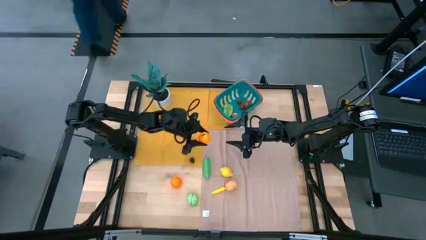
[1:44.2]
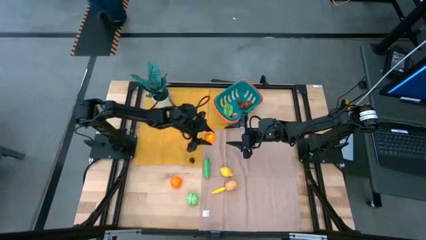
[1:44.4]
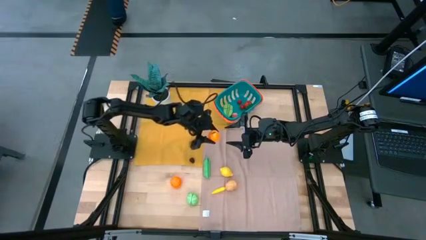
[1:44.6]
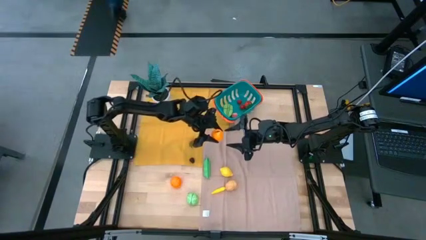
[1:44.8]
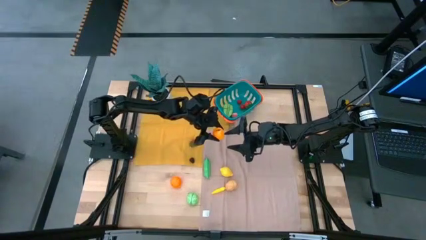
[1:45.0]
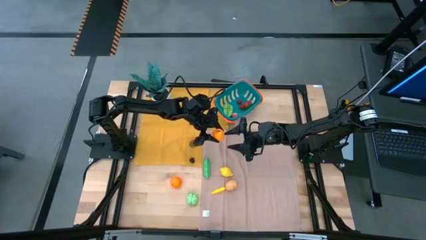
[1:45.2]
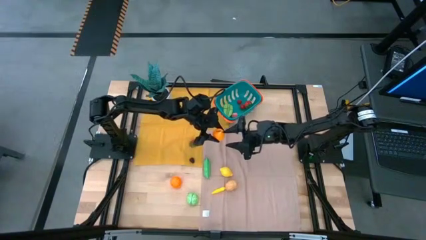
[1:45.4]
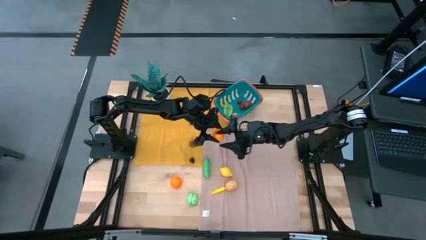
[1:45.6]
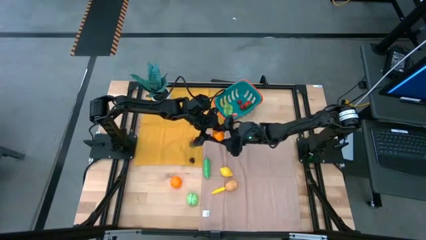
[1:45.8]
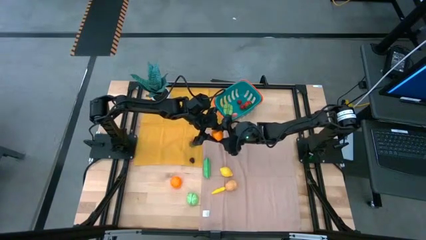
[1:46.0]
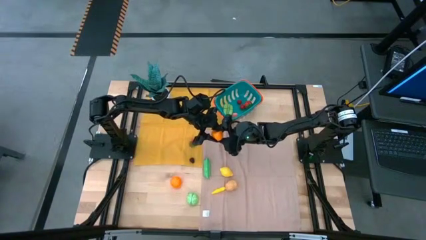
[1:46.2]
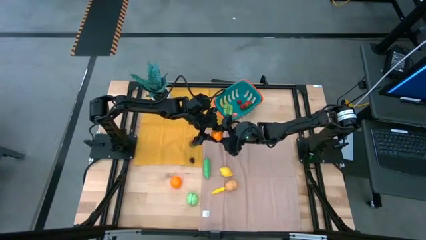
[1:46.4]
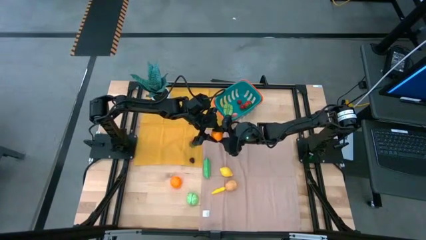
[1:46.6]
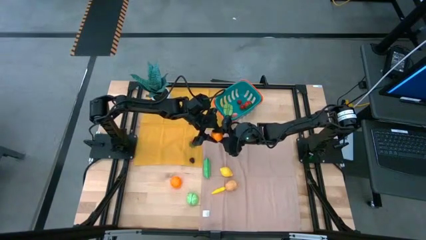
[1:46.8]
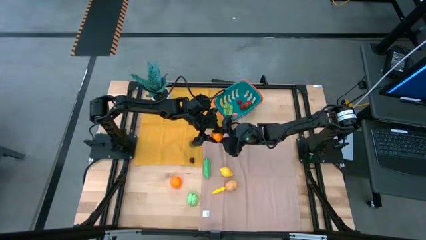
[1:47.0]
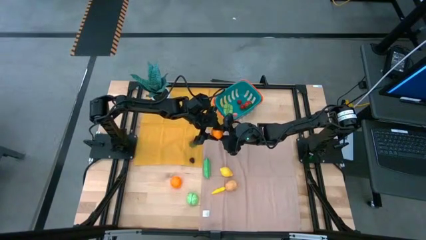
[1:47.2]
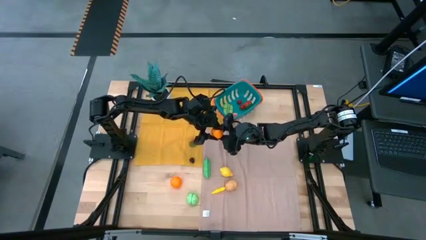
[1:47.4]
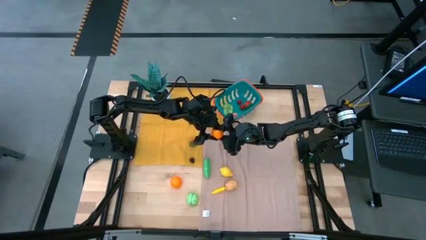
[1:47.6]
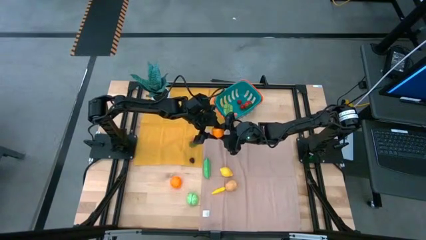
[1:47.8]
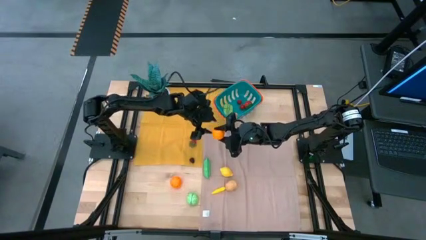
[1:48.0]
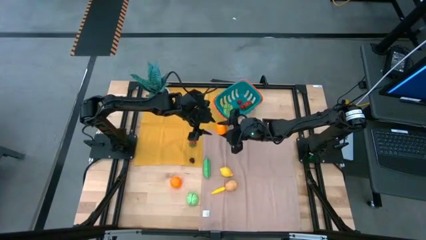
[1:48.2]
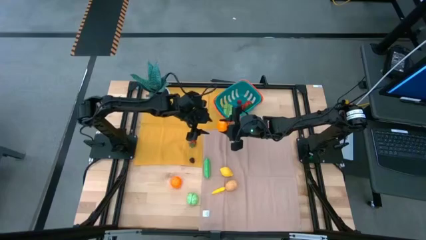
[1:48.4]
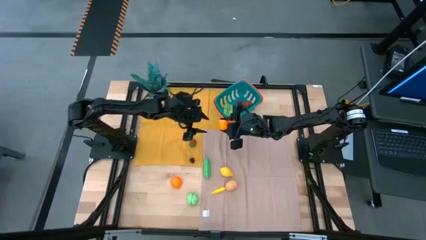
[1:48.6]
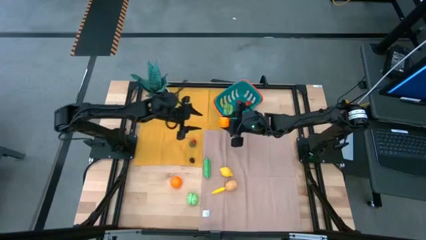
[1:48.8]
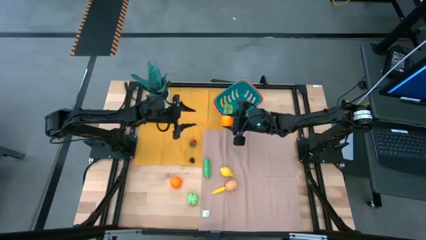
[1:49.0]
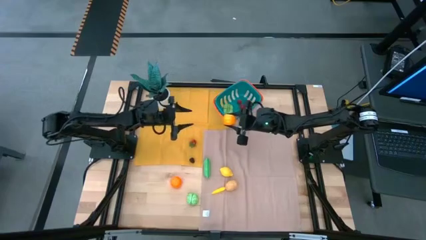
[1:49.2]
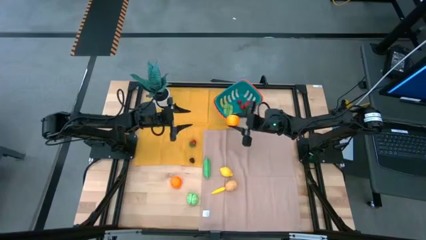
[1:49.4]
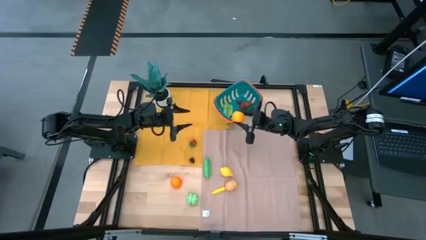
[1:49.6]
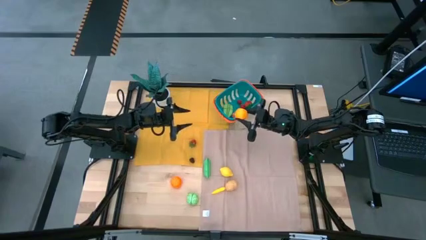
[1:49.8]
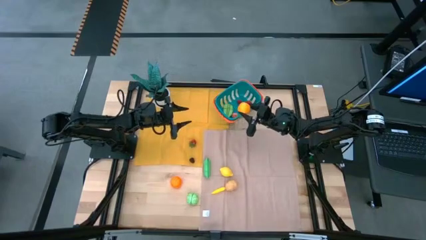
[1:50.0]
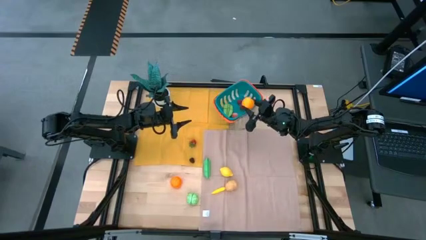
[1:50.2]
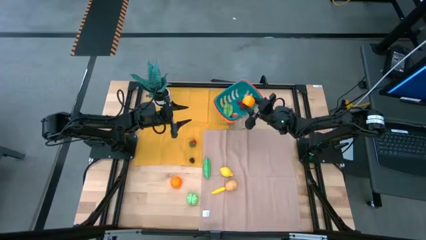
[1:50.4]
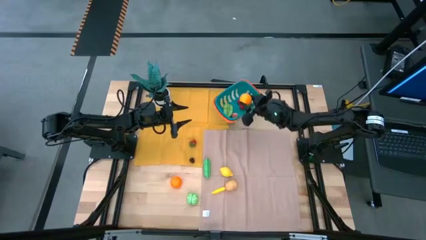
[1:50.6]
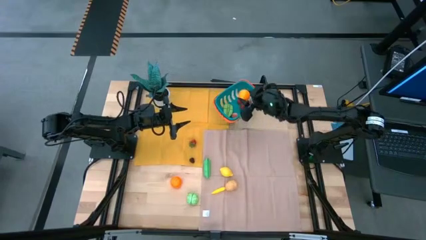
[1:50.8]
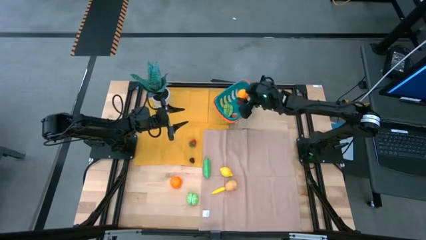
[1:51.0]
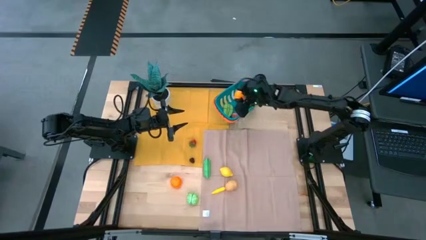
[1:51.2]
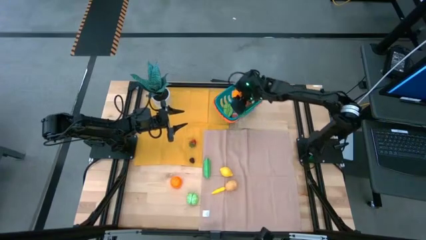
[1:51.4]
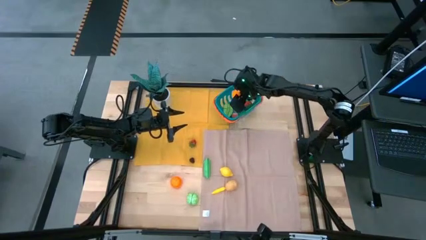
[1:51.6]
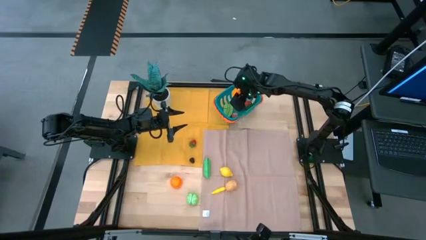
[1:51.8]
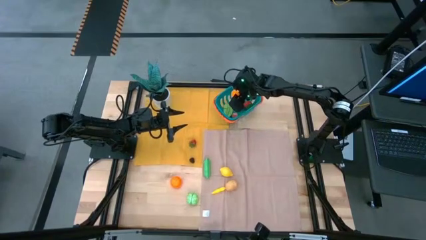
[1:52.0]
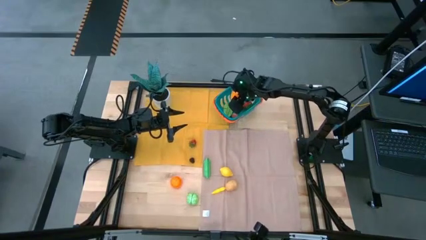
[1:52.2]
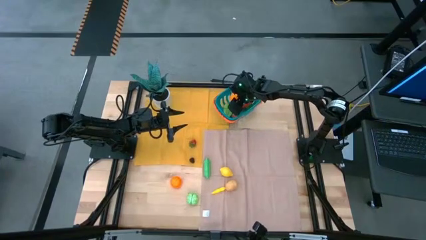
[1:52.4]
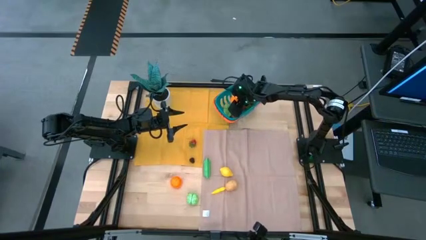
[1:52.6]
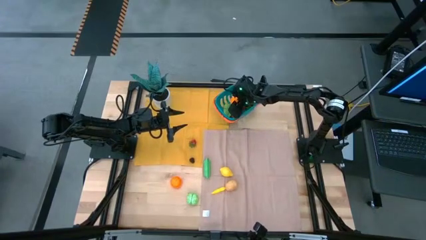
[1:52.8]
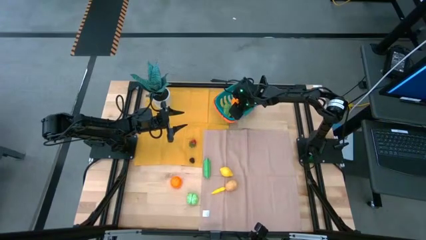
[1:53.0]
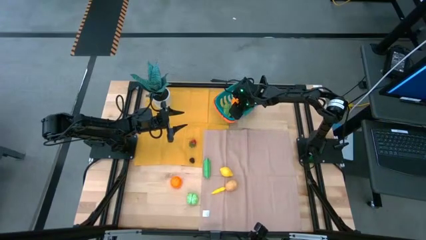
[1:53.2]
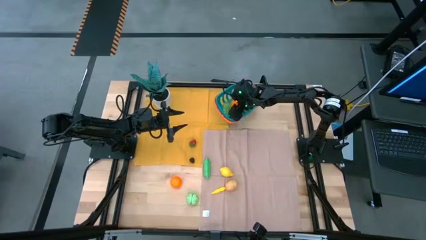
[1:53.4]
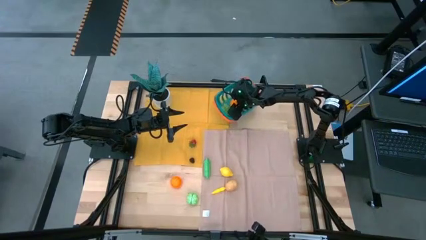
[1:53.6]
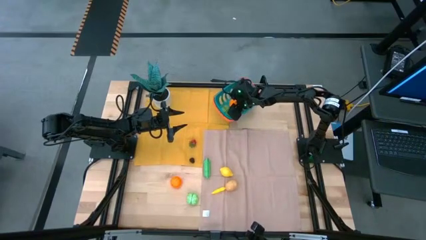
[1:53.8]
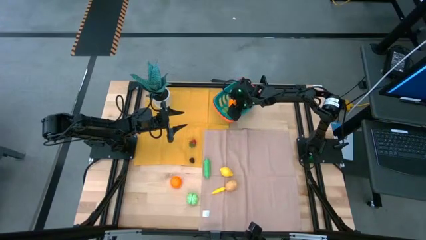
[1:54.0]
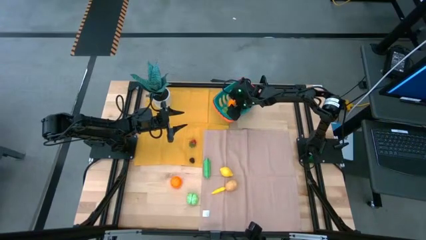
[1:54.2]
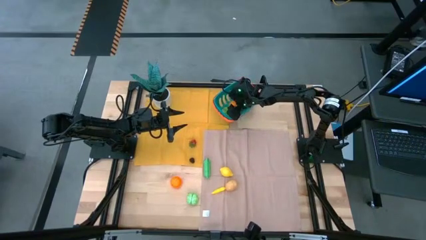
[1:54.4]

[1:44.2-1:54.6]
Task: Pick and placing Produce into tupperware
Put the orange into the basket

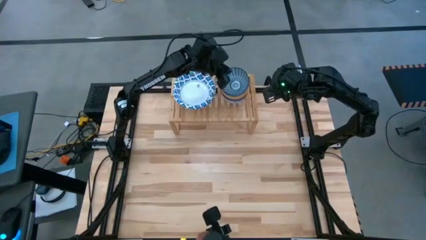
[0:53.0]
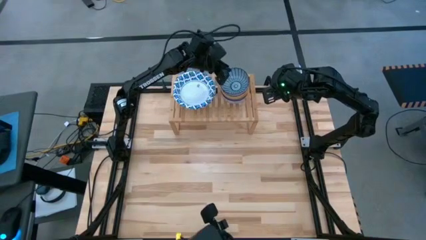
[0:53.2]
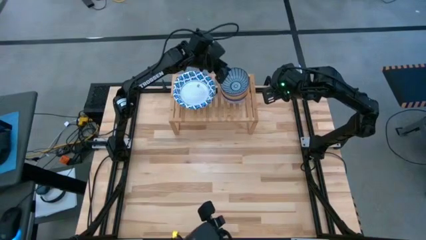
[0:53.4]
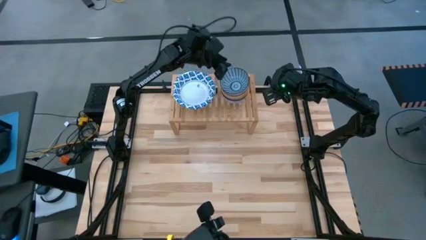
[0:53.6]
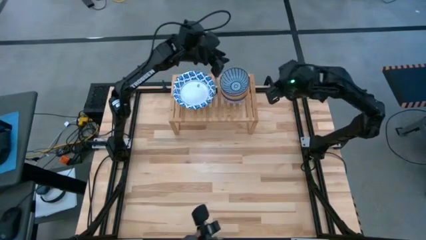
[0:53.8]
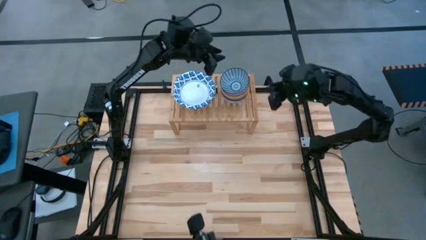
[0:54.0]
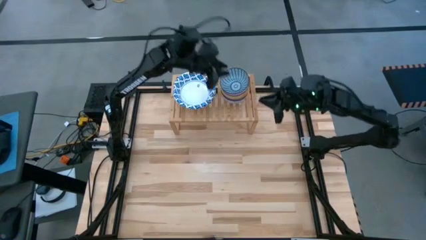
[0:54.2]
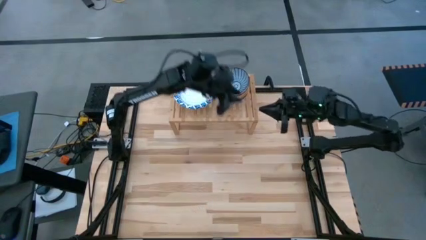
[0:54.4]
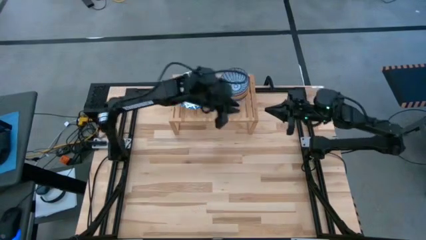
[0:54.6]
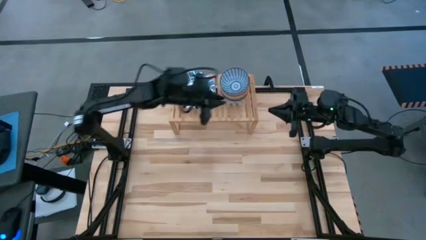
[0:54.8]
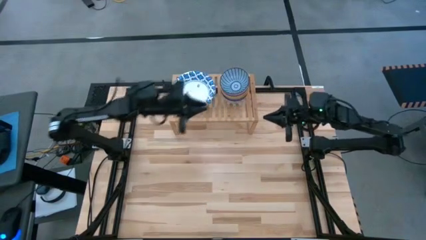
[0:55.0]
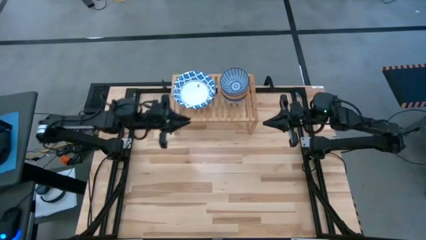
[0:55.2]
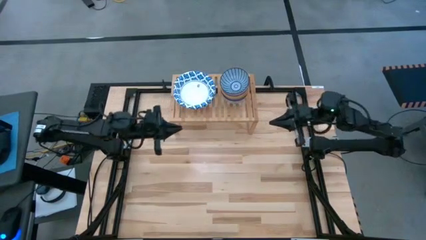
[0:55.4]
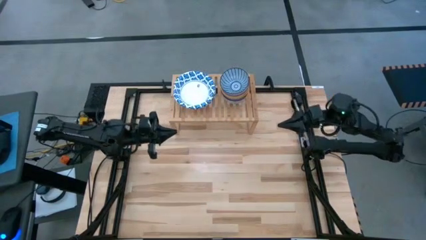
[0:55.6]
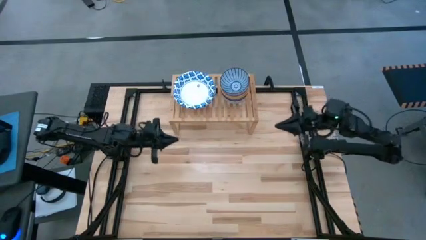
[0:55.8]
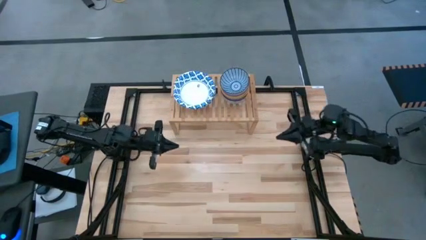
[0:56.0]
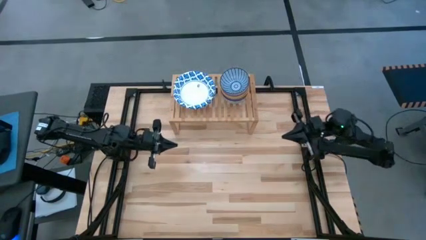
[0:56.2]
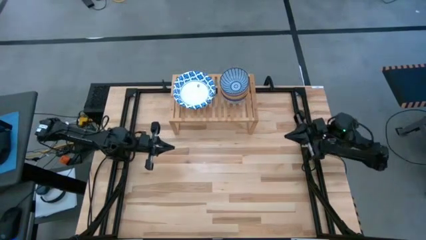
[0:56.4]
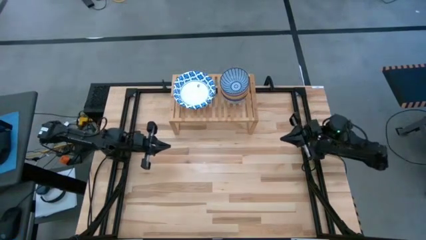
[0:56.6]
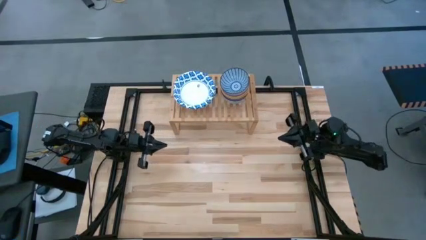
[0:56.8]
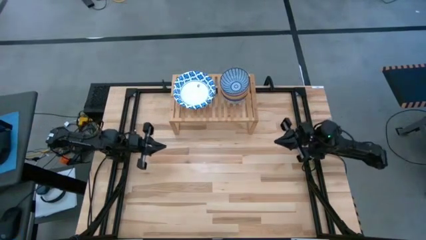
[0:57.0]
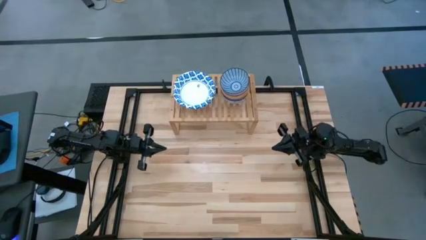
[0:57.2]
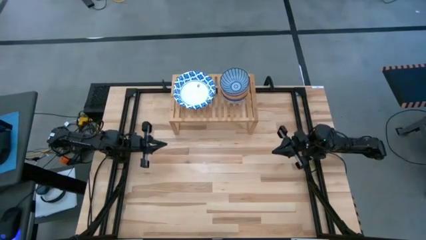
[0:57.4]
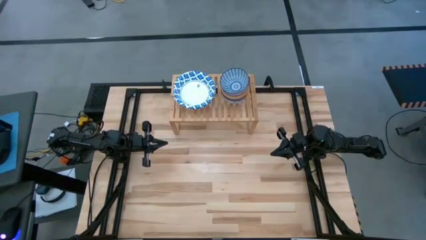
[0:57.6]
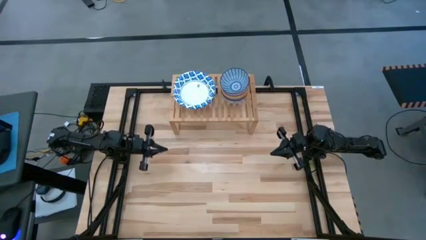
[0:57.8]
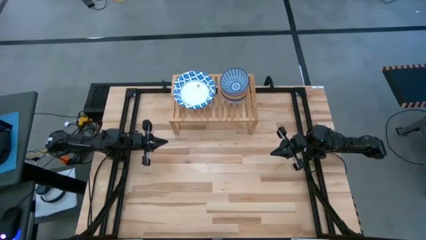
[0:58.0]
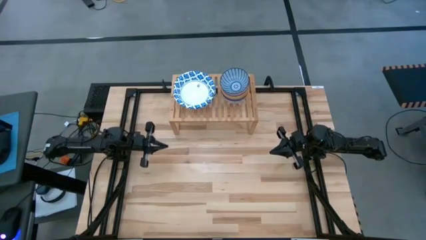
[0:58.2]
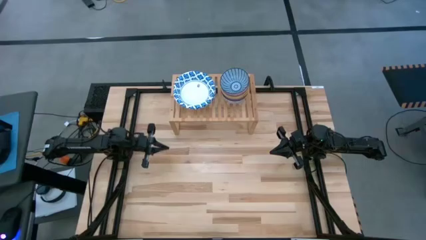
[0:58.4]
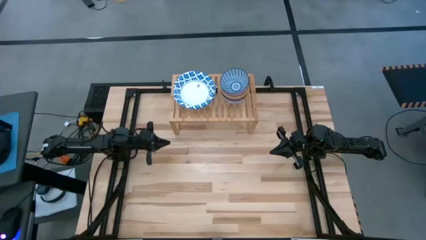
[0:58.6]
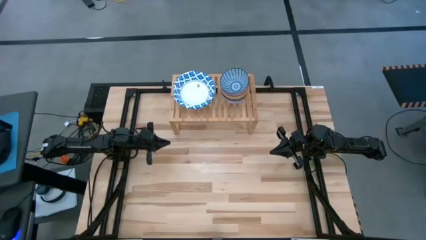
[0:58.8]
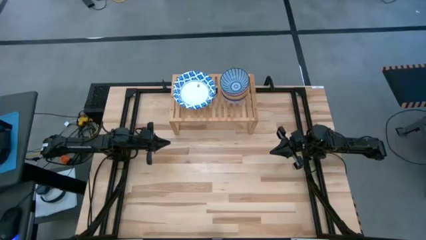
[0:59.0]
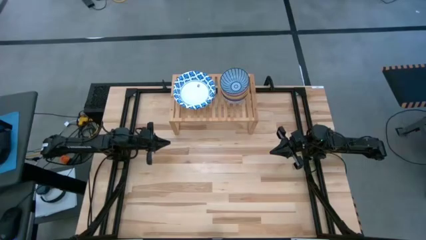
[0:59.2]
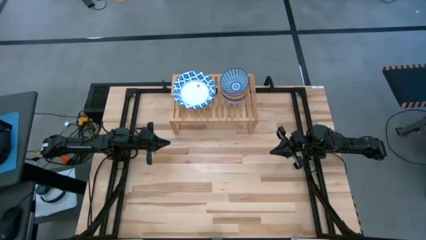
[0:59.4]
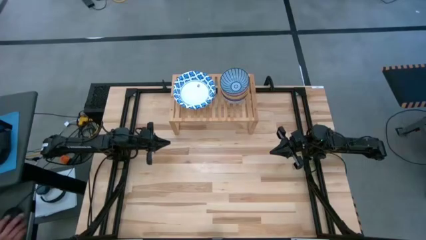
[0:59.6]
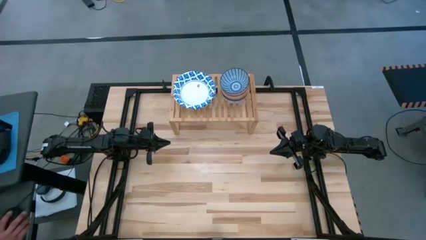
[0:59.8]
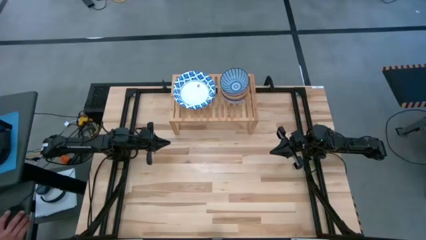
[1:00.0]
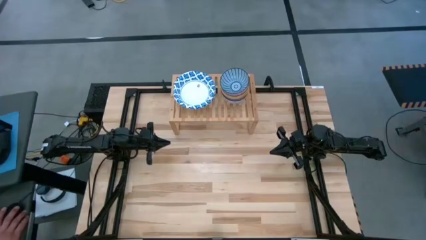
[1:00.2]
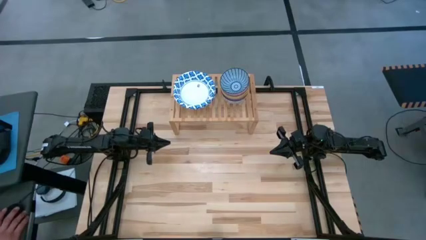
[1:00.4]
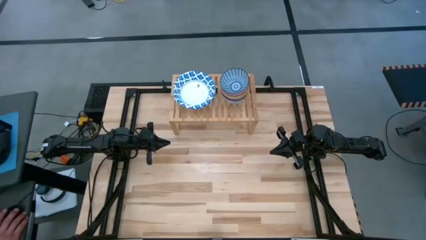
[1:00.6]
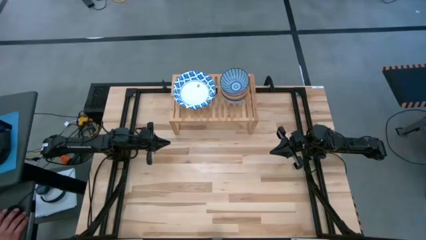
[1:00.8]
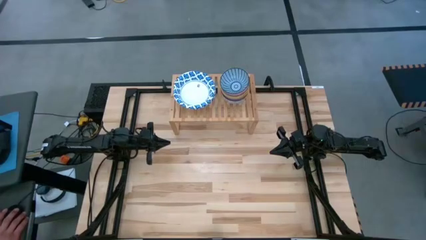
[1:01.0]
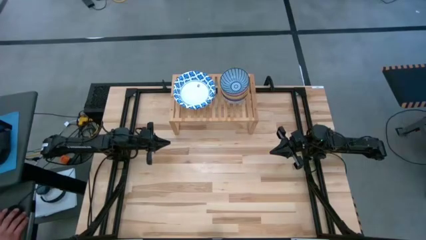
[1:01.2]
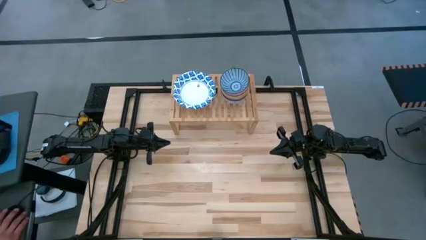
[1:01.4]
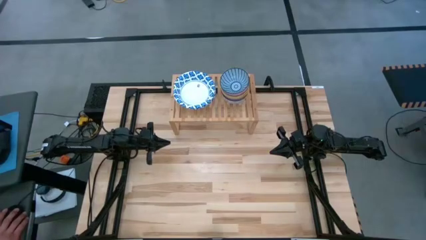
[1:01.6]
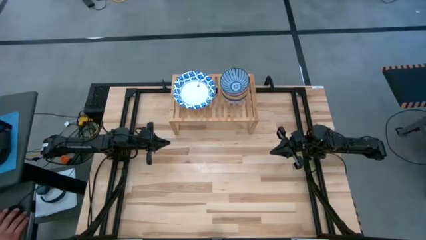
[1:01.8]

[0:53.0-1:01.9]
Task: Place and stack bowls onto a shelf
Return to Home Position
